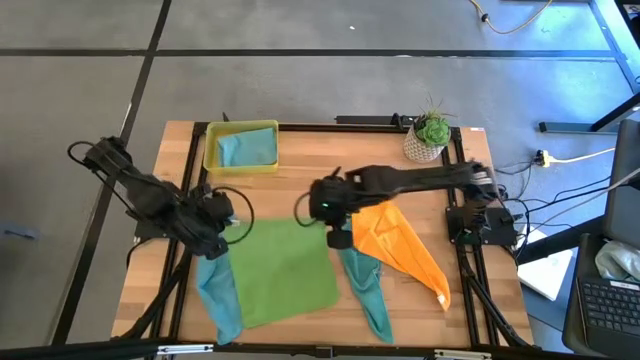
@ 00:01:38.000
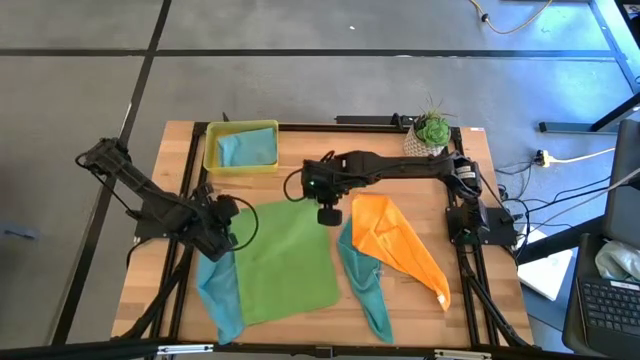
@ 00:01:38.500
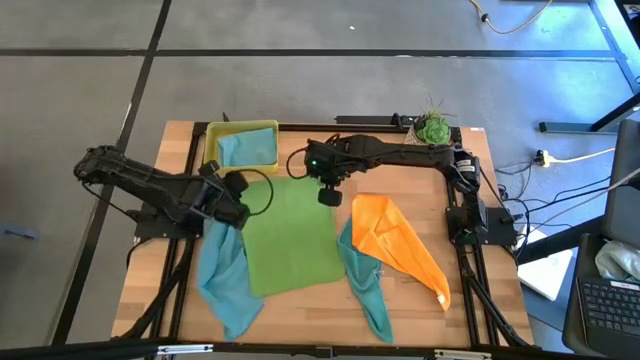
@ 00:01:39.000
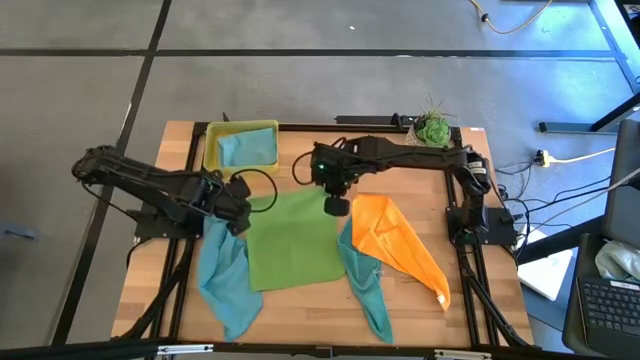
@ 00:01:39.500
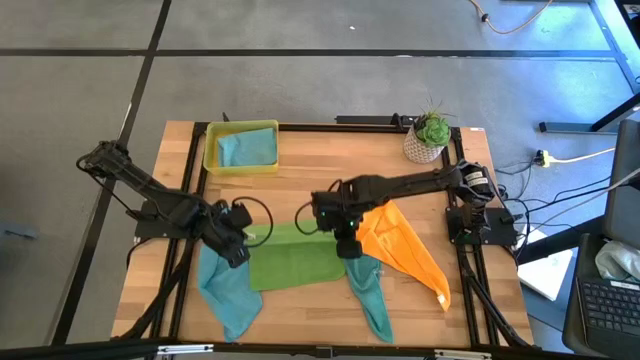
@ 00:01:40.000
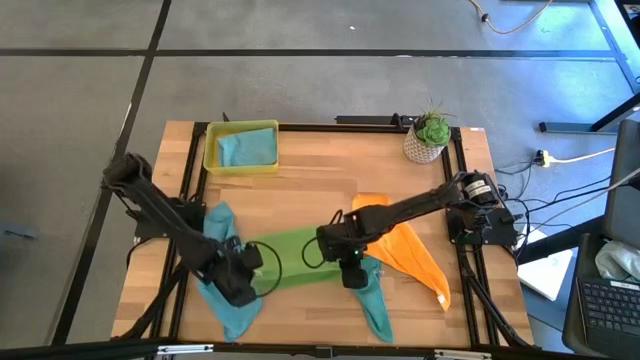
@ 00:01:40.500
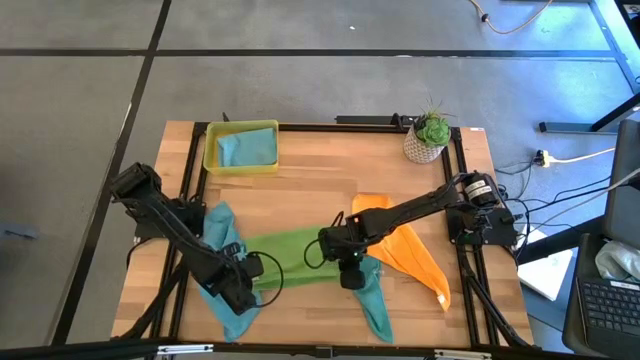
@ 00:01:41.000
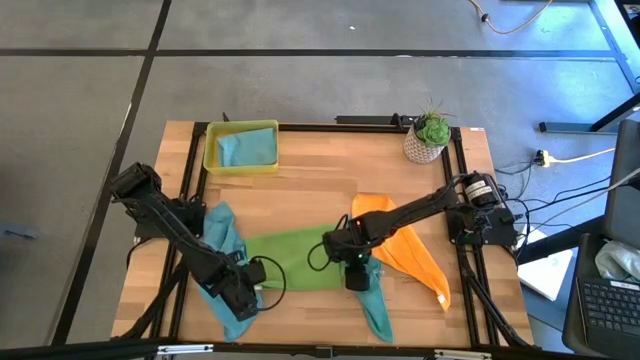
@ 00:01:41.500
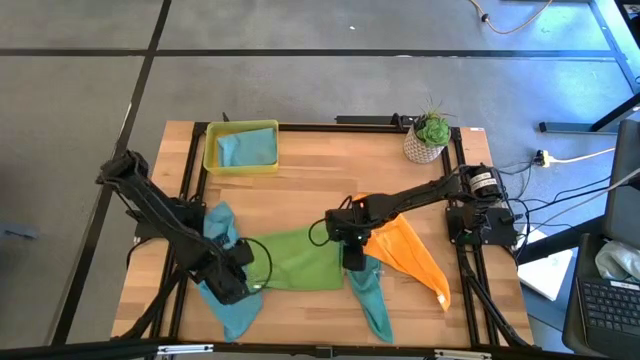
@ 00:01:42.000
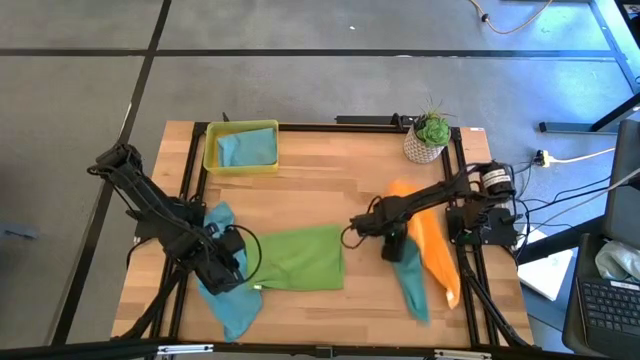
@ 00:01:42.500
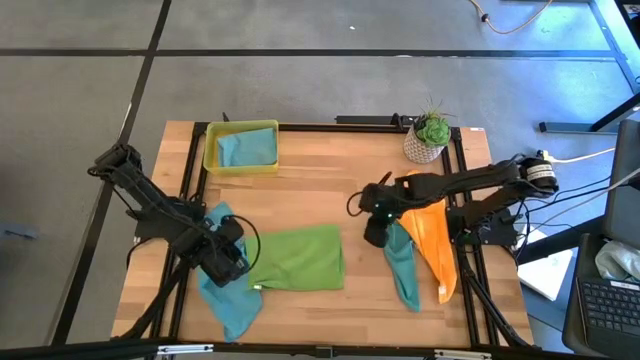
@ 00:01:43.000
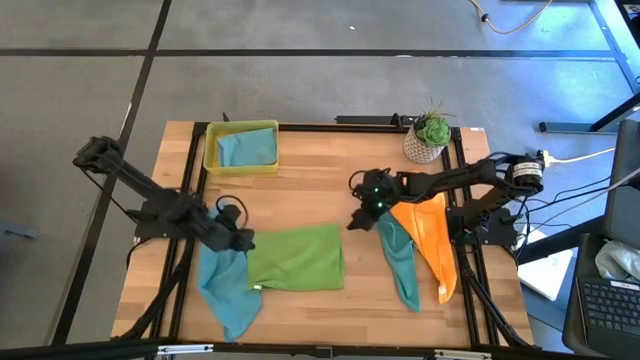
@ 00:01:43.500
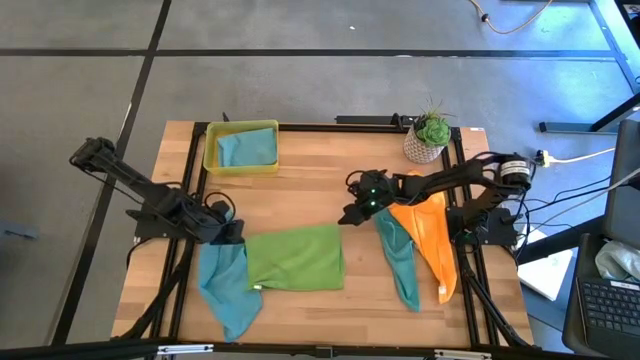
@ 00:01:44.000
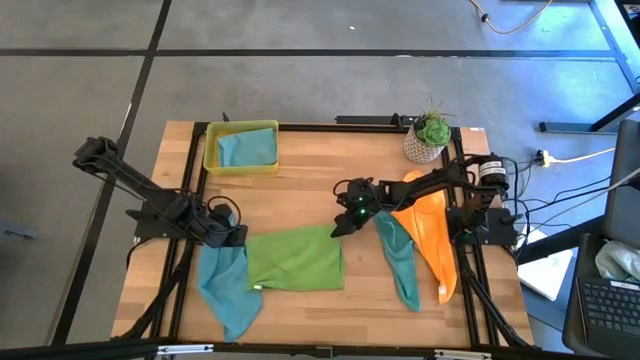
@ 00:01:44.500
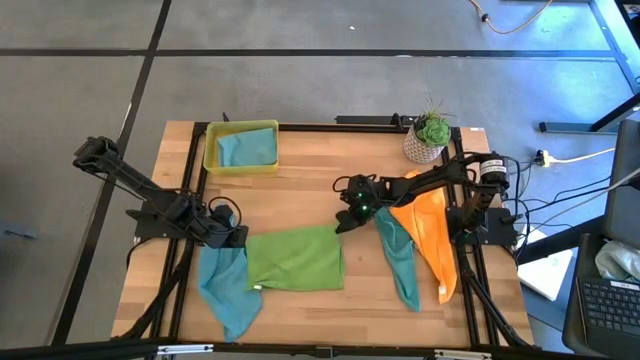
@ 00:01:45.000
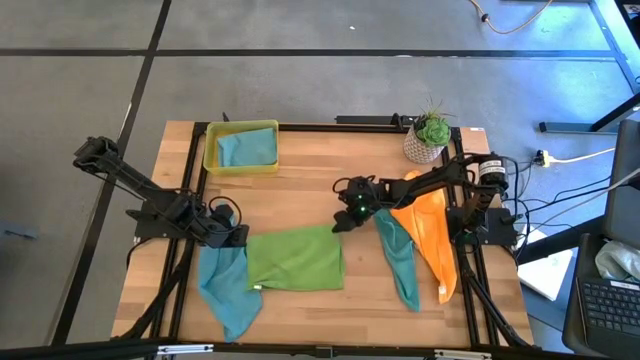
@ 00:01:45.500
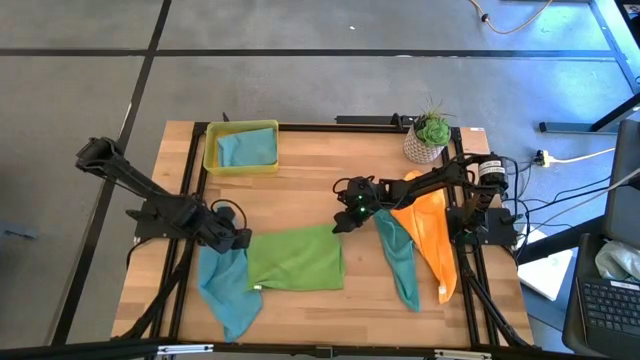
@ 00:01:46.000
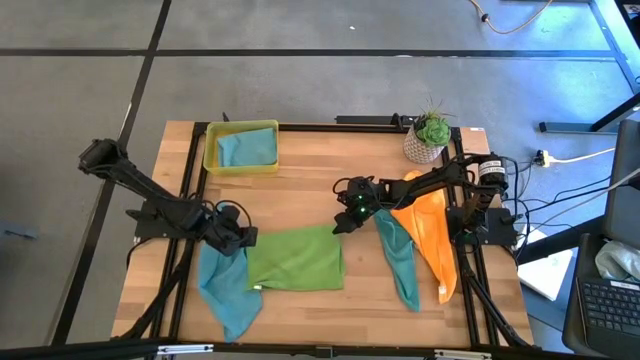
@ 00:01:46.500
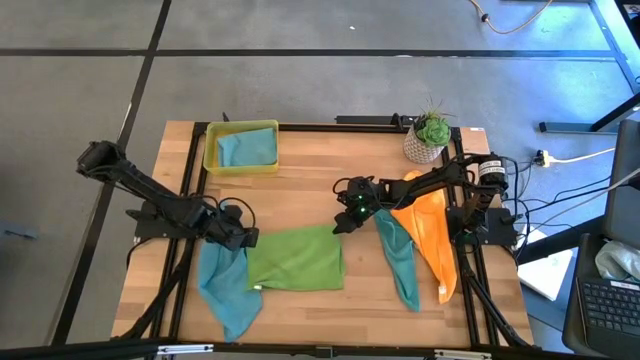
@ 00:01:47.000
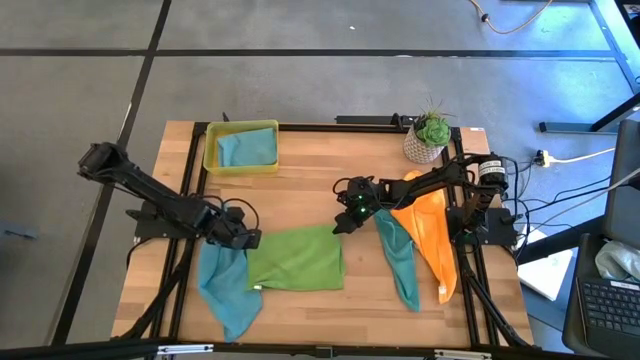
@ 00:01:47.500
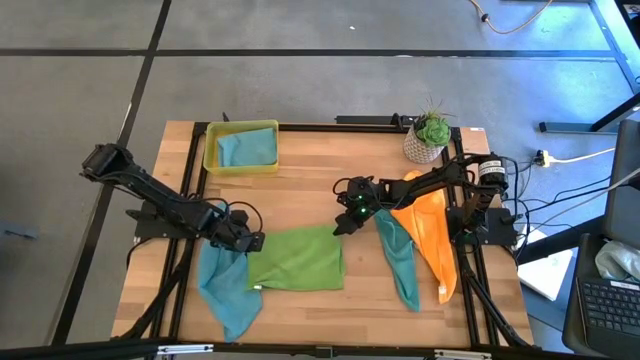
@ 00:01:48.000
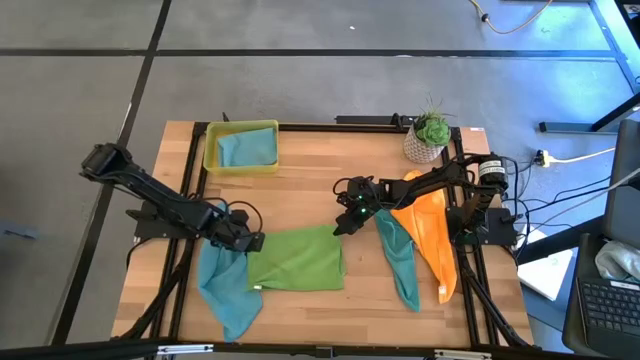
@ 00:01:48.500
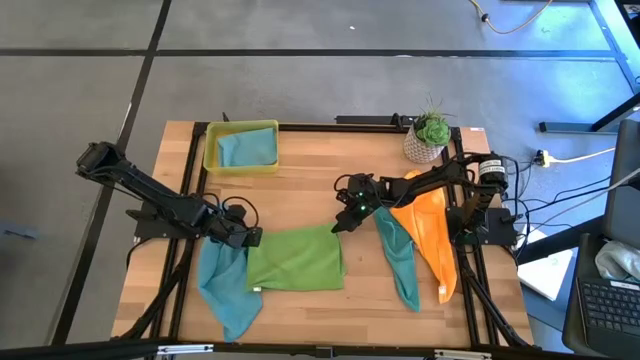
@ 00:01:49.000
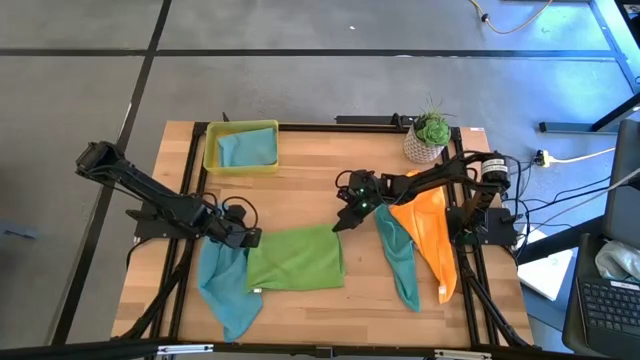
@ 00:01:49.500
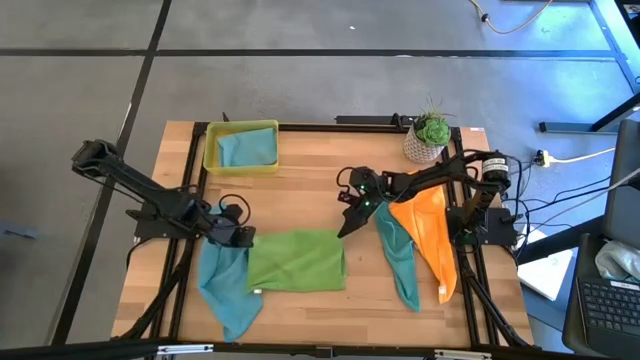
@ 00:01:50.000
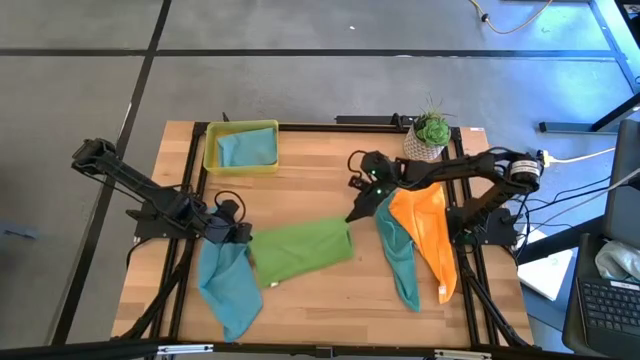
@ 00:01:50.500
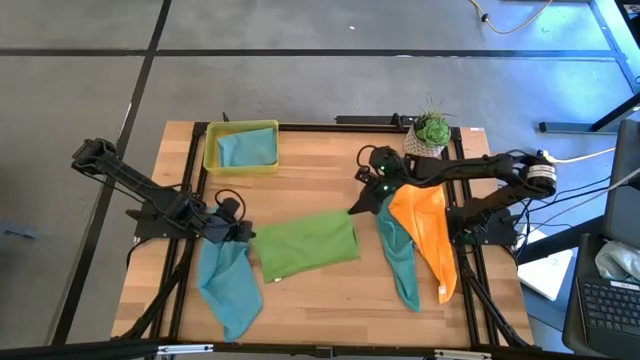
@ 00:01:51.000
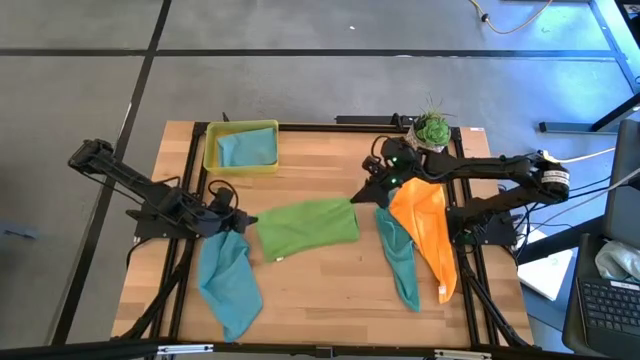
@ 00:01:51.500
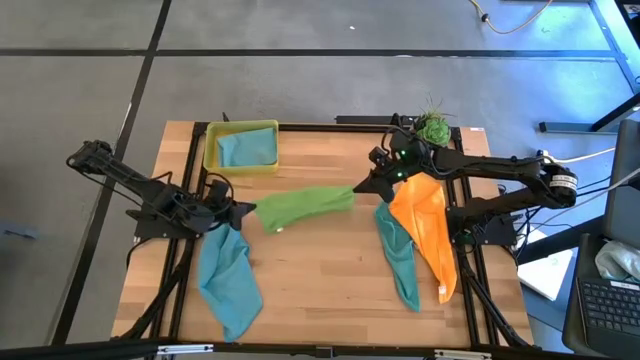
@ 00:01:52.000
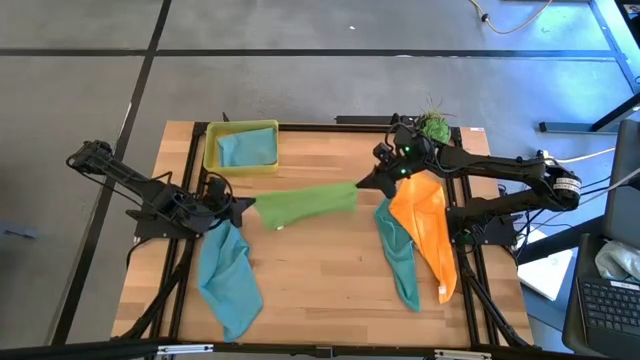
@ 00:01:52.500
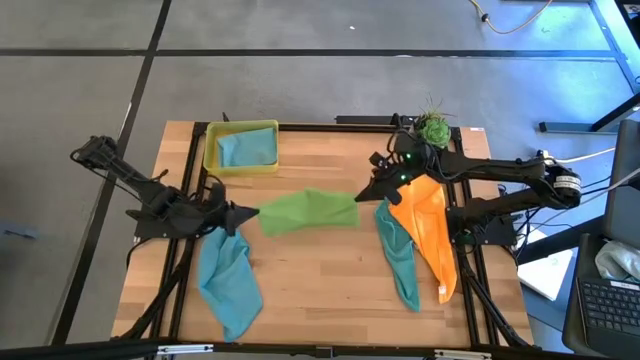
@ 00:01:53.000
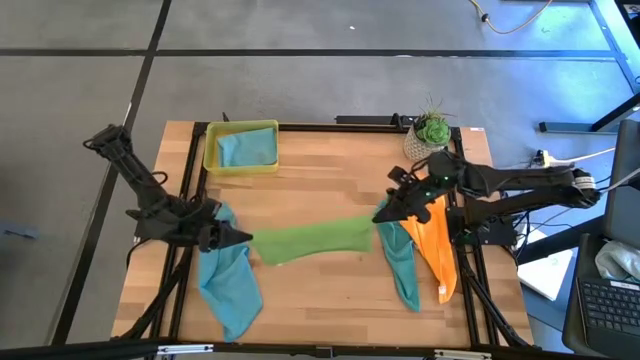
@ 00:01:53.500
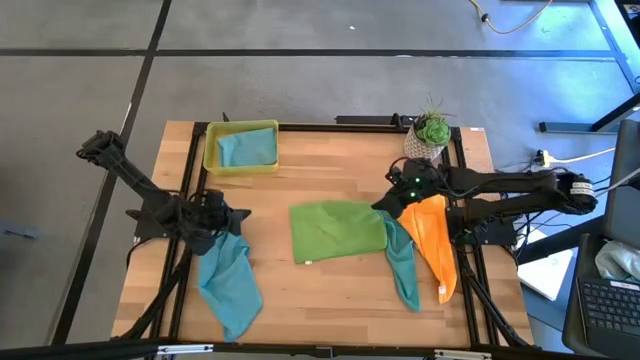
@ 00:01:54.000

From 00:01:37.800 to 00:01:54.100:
Task: Fold microfiber towels
Fold the green towel

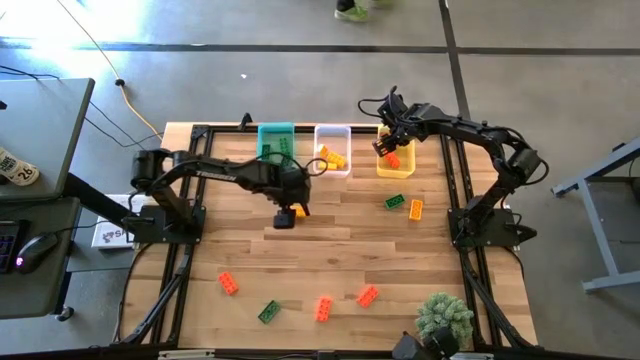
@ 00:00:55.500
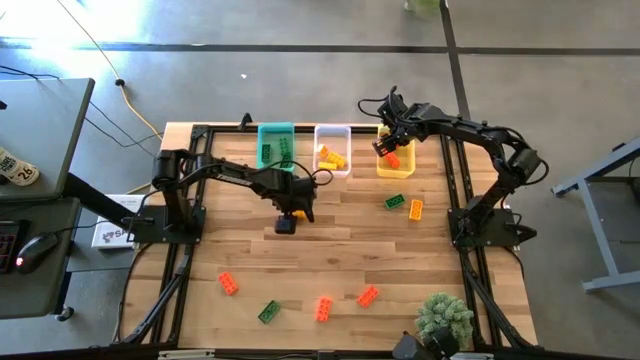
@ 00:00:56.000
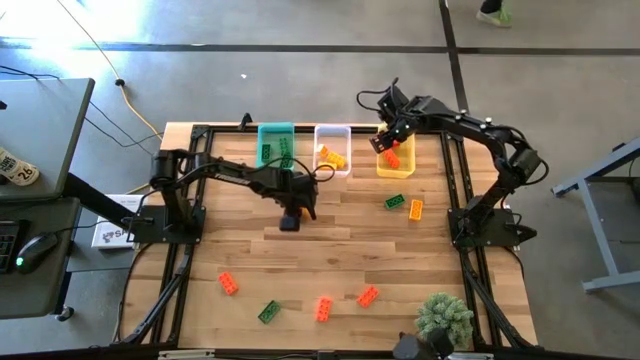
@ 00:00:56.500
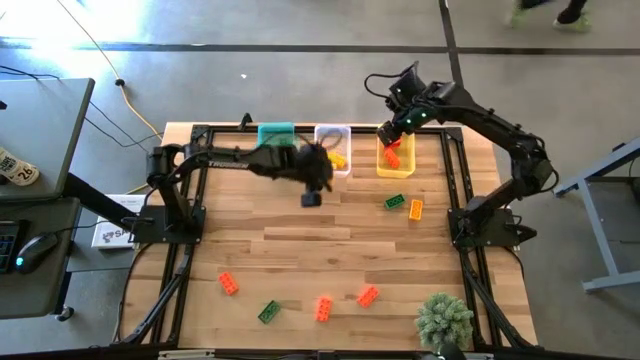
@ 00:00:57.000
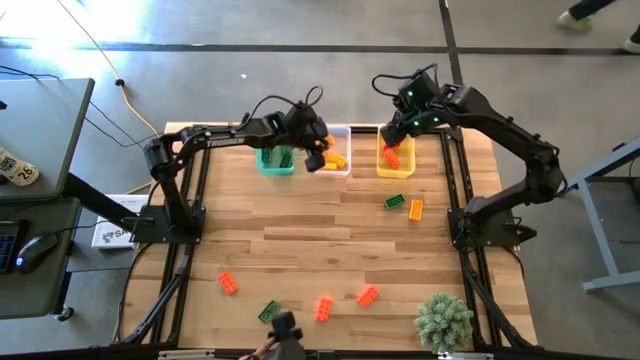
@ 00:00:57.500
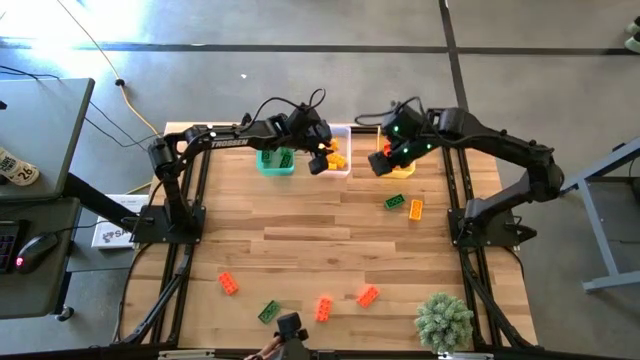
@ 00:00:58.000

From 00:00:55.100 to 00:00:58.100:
Task: Sort & place blocks by color
Put the yellow game piece into the white bin
